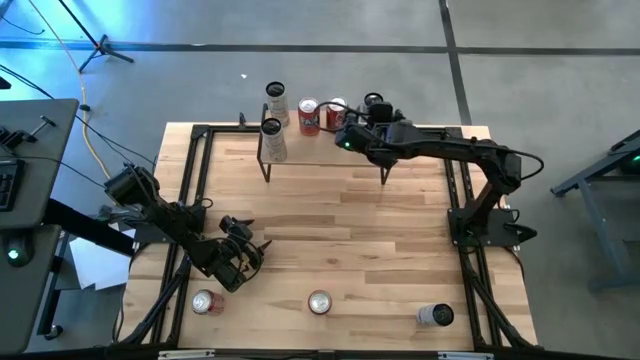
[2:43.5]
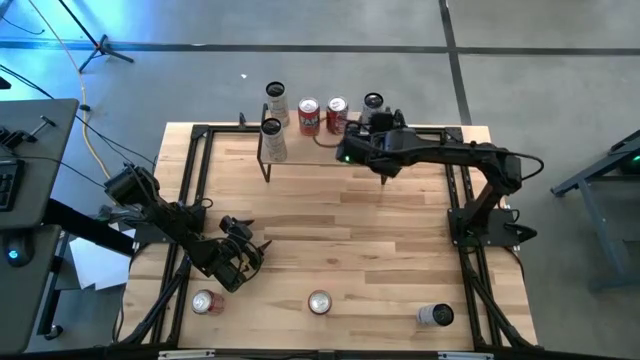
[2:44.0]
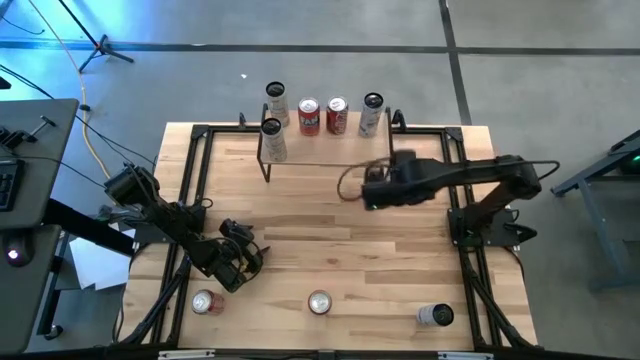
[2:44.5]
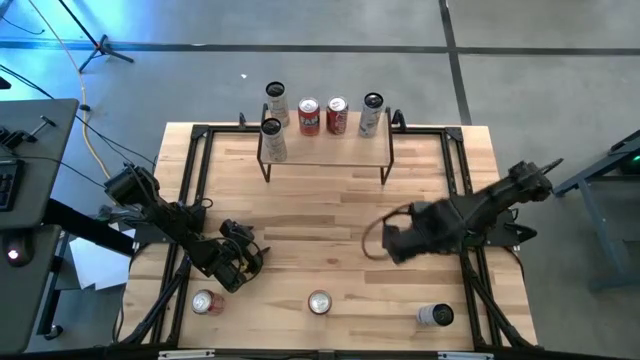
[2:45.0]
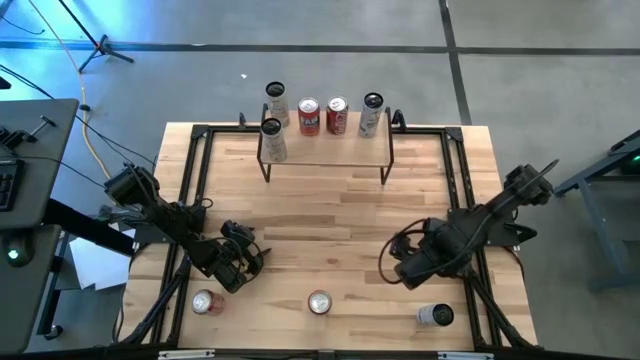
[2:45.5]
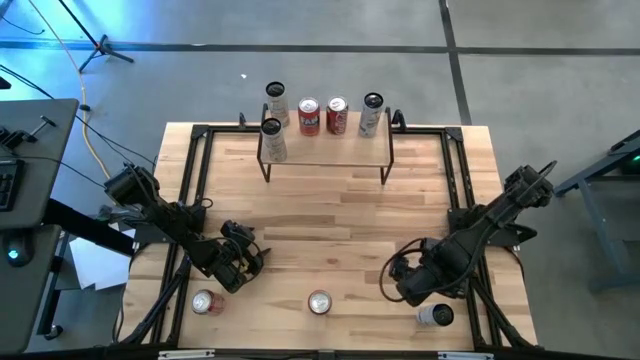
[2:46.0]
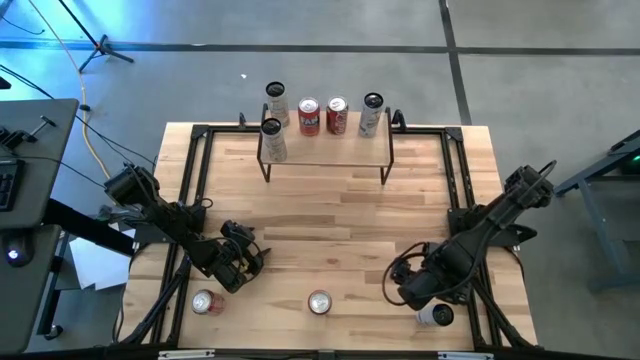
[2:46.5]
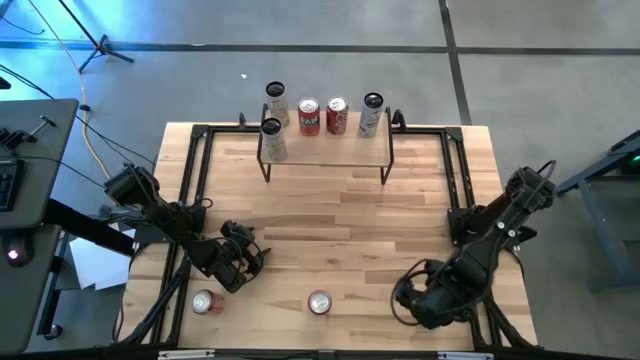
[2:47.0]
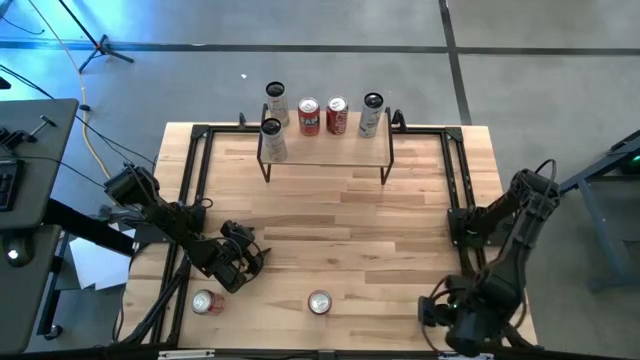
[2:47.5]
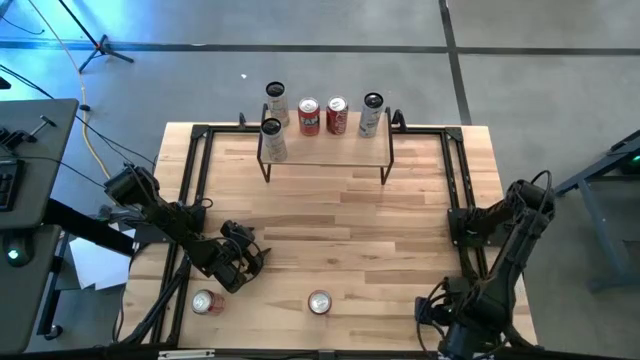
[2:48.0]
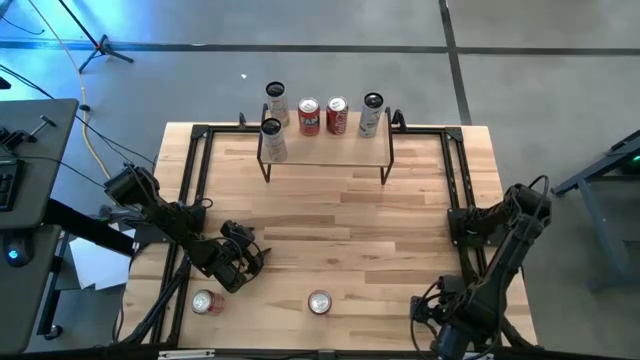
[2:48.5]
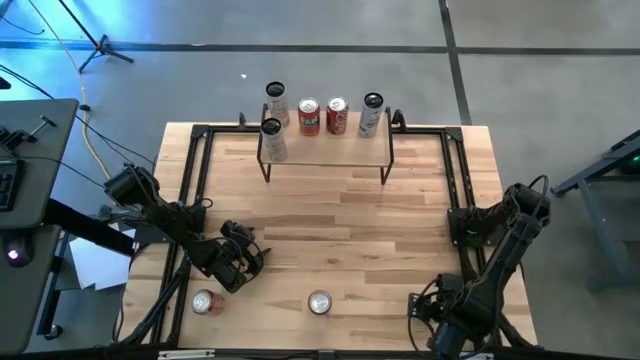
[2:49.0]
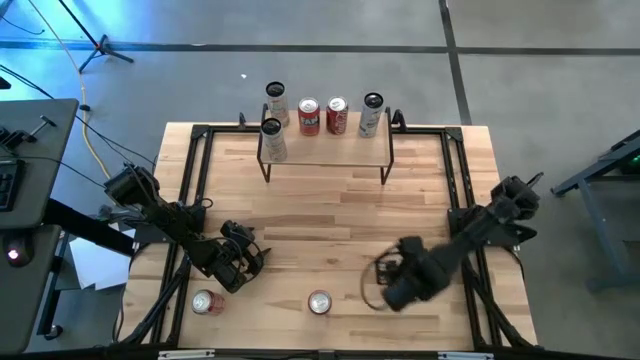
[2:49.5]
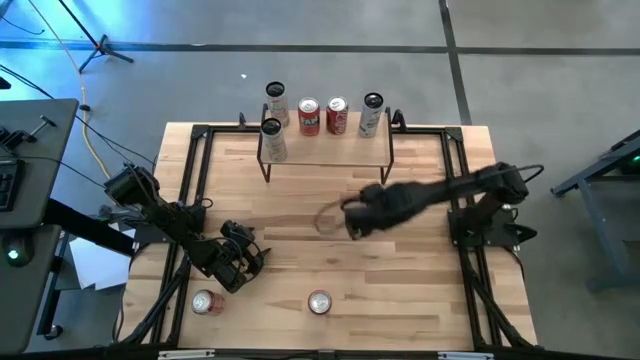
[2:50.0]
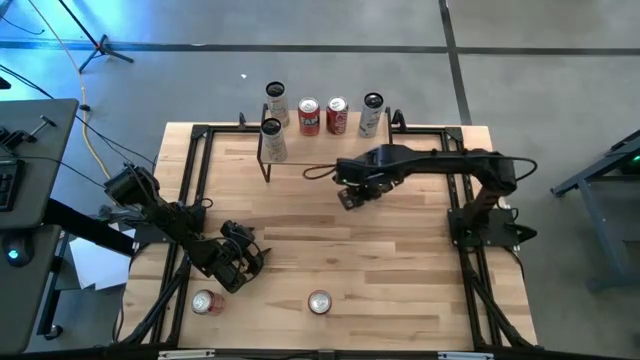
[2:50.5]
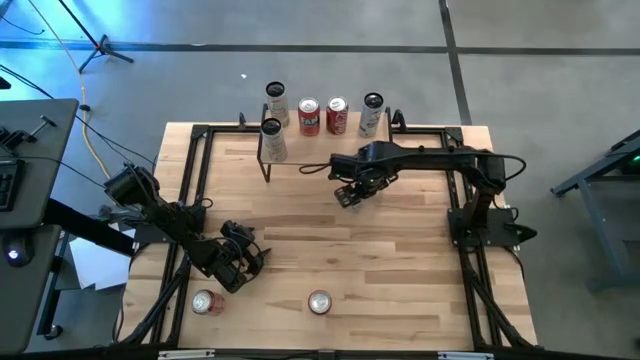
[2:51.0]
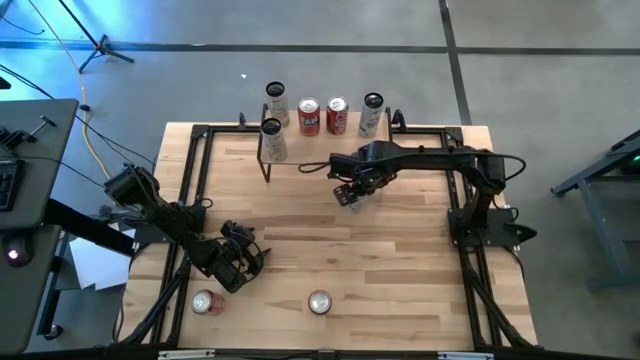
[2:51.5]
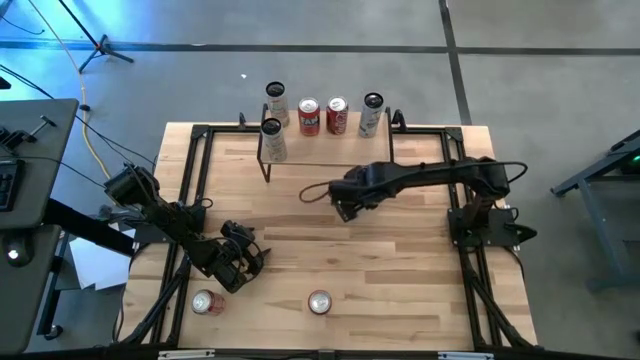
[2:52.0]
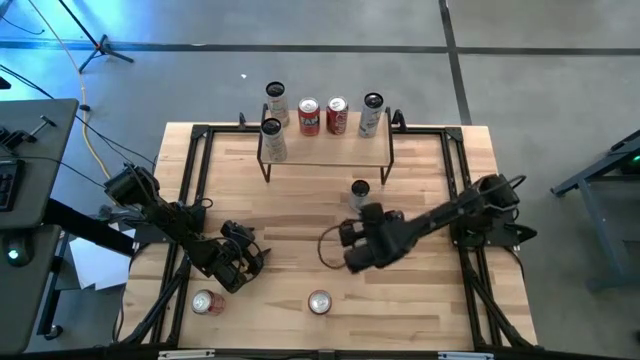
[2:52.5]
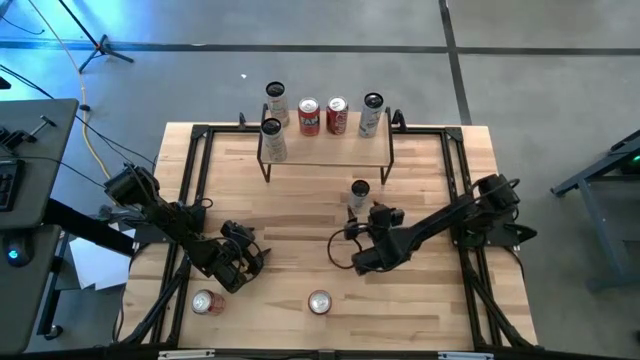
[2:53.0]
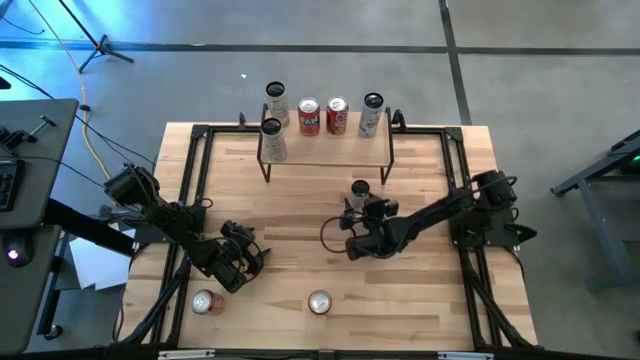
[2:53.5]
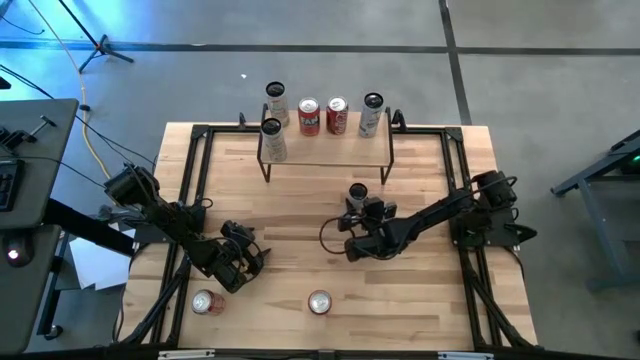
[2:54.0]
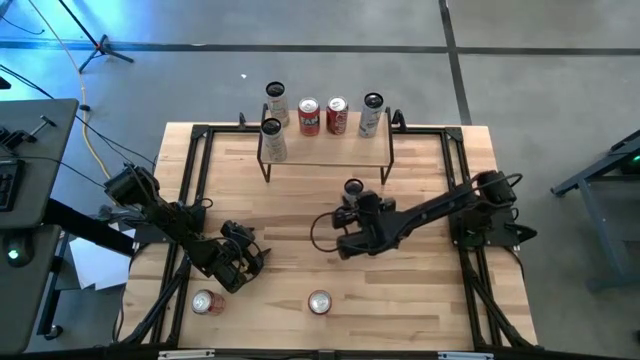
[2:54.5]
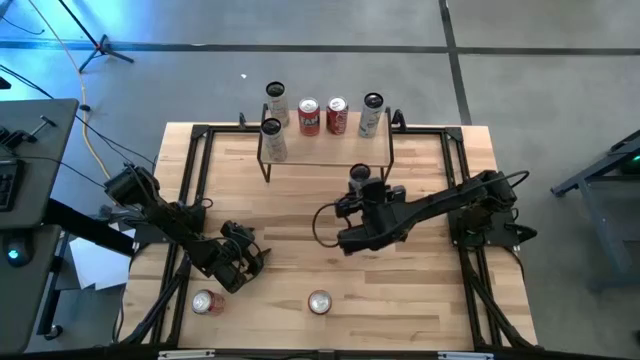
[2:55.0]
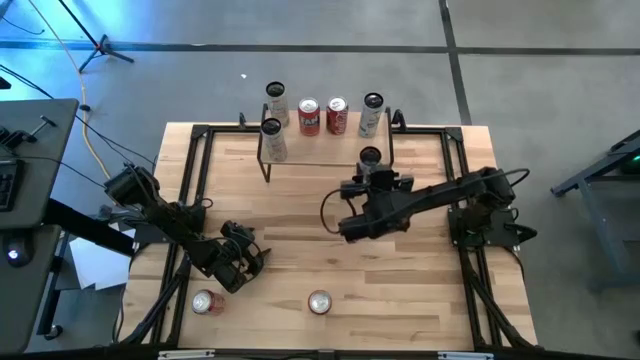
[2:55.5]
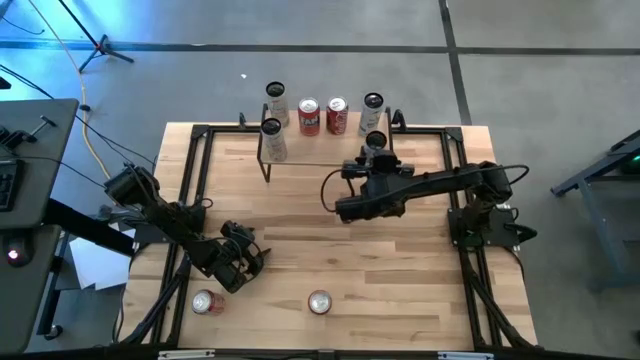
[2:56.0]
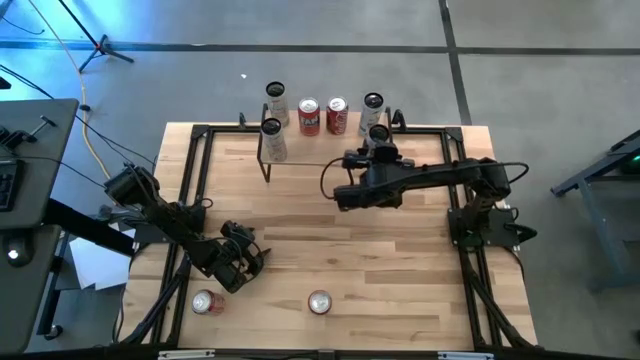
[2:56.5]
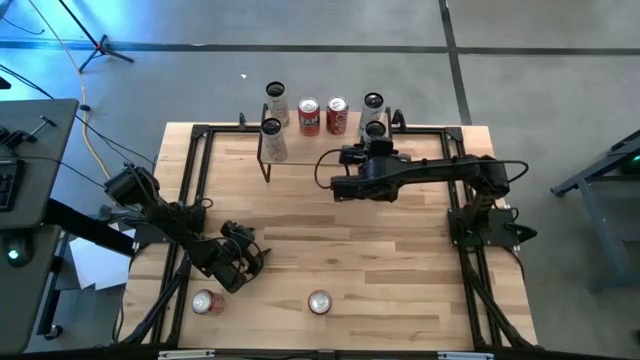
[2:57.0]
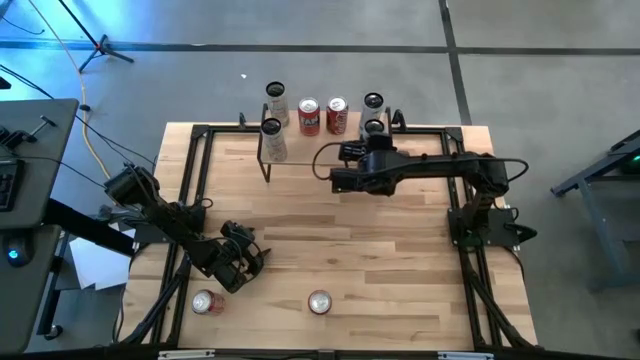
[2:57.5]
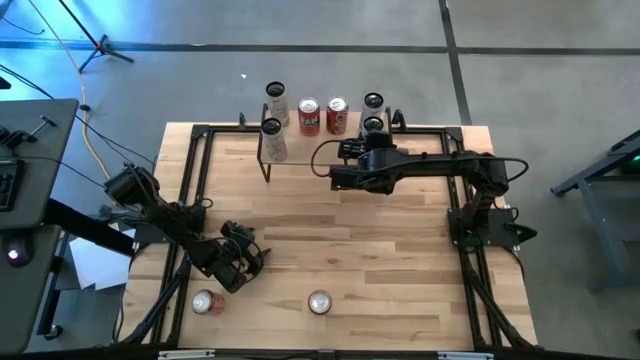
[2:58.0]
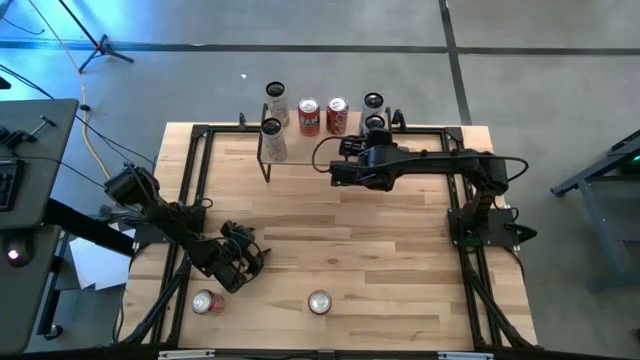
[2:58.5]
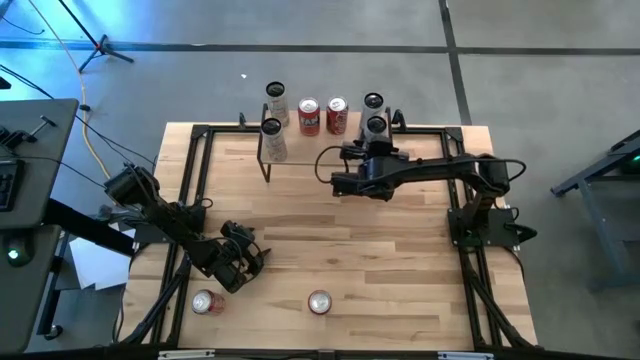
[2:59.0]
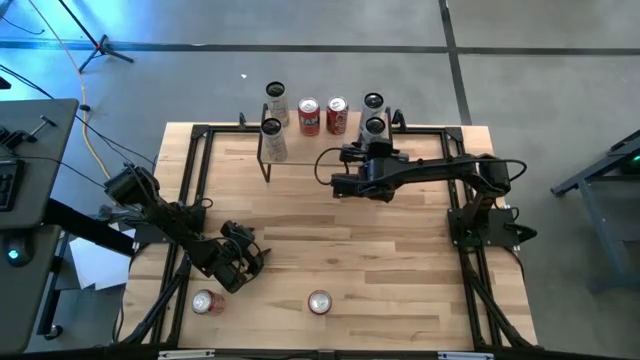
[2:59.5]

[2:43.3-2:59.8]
Task: Place canned beverage on shelf
Put the white and blue soda can on the shelf aligned with the other white and blue soda can

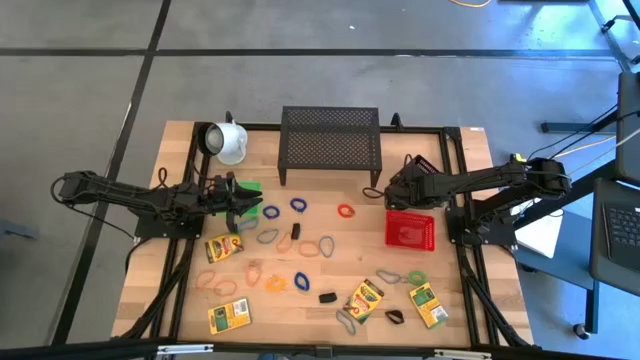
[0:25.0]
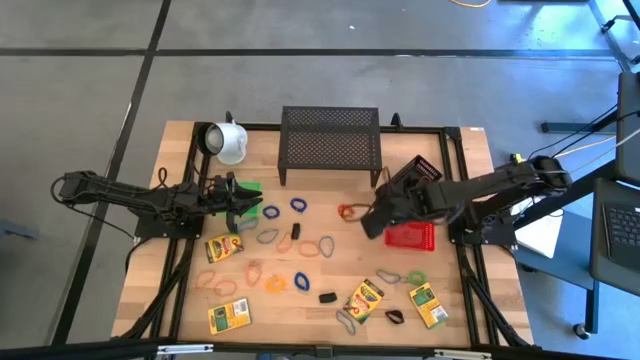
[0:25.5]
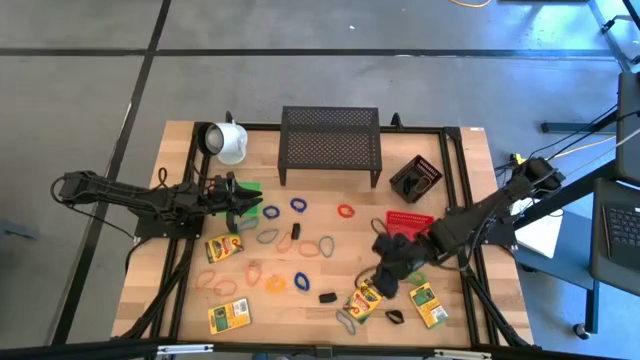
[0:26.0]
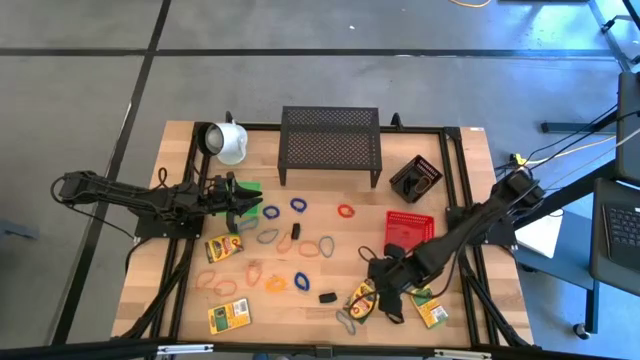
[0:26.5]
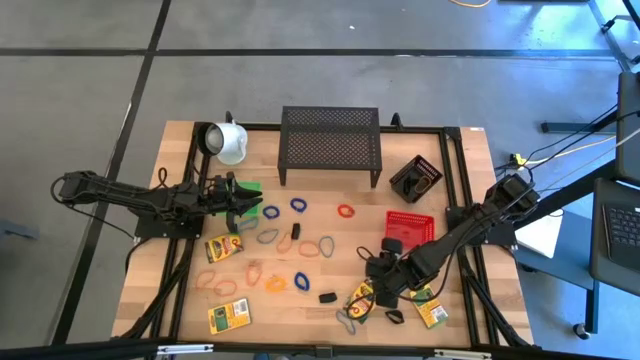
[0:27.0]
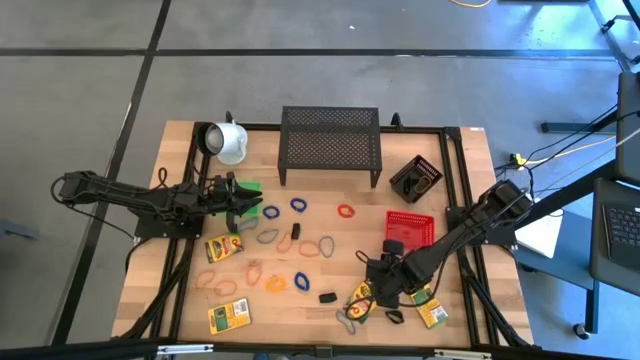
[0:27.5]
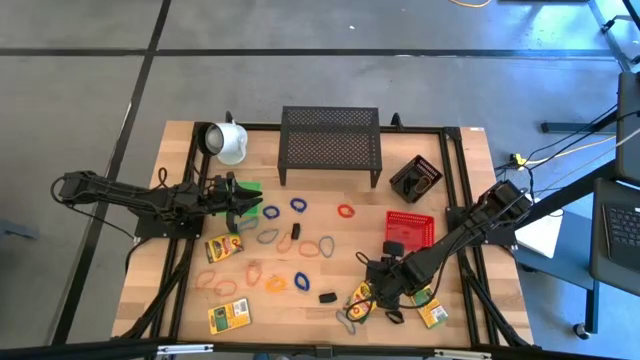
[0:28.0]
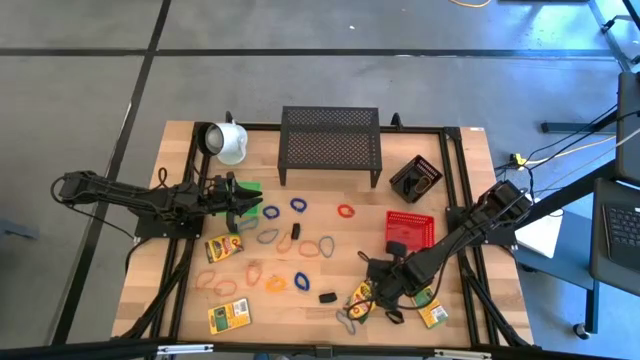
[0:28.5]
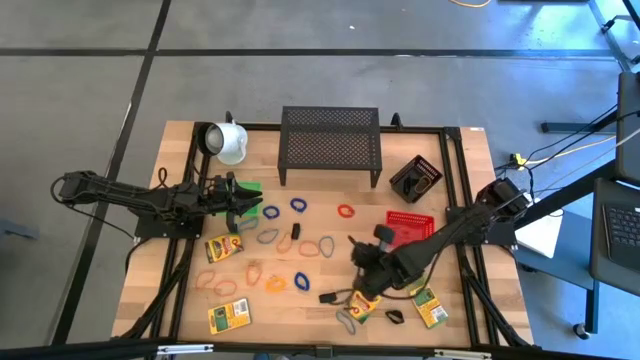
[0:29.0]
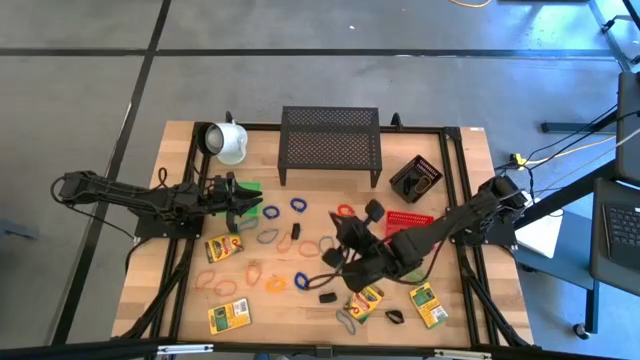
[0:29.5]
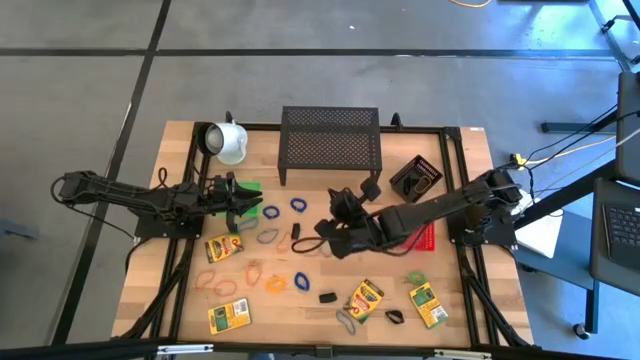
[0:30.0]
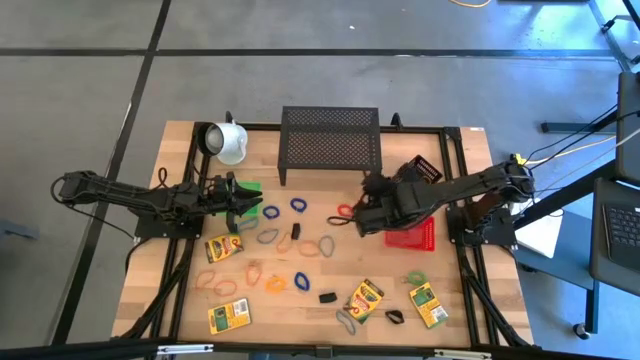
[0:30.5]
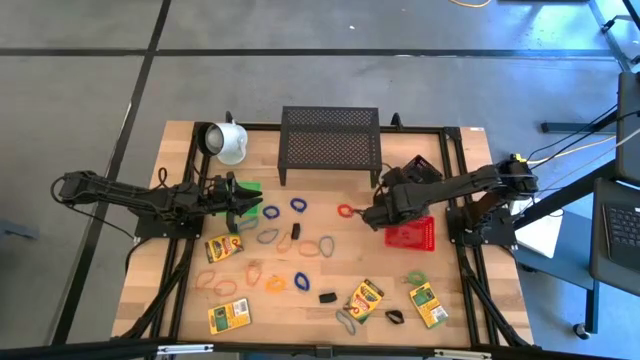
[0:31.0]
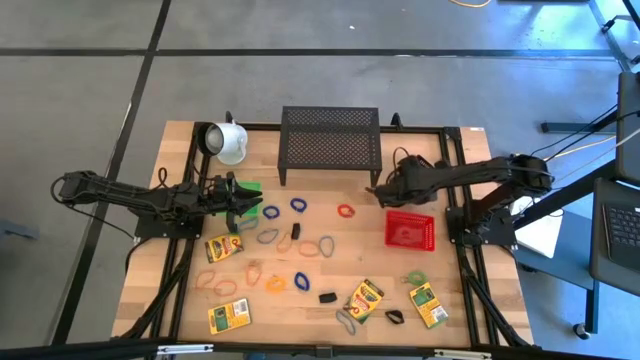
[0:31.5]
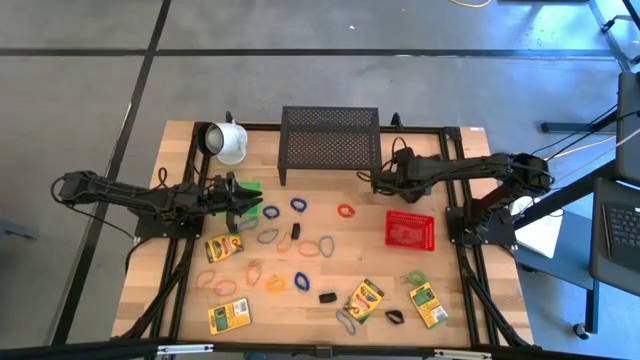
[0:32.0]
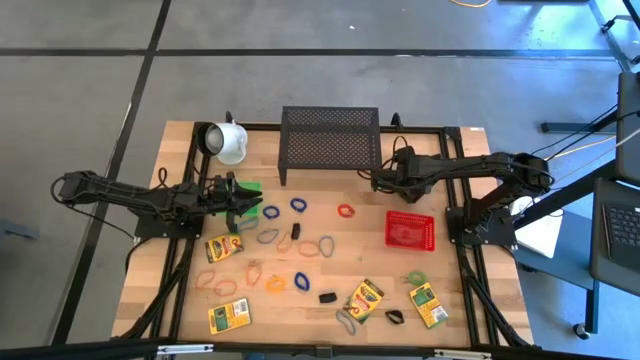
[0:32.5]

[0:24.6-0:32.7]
Task: Pick & Place Office Desk Supplies
Put the blue rubber band into the black bin
